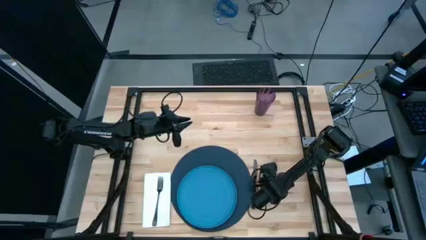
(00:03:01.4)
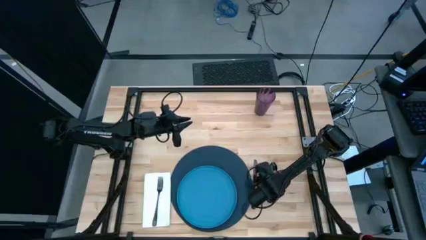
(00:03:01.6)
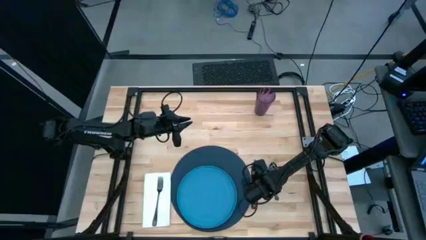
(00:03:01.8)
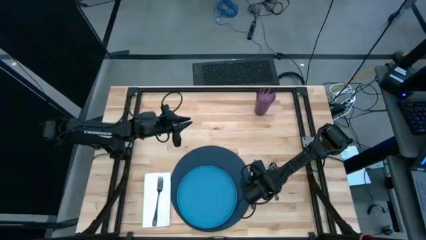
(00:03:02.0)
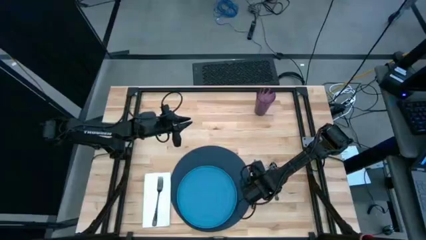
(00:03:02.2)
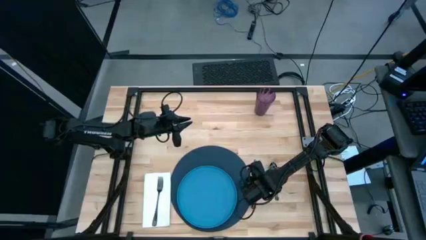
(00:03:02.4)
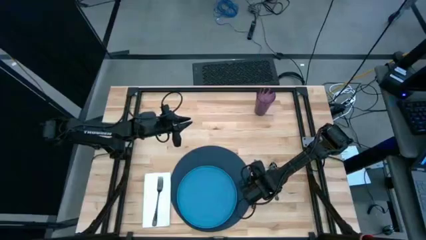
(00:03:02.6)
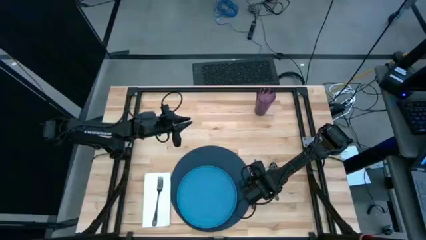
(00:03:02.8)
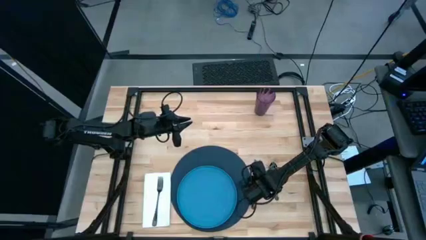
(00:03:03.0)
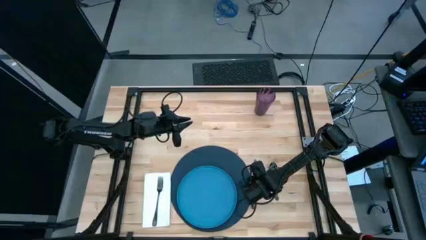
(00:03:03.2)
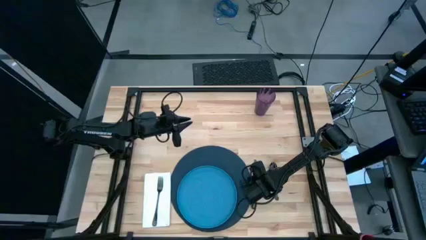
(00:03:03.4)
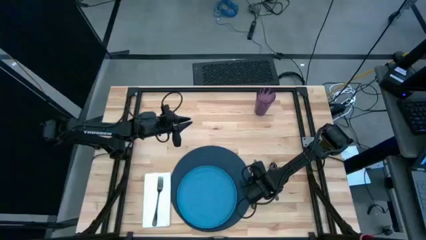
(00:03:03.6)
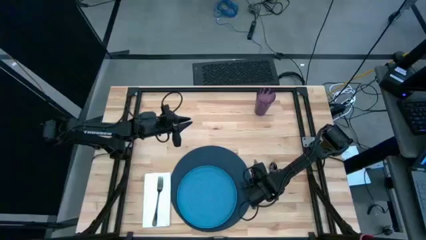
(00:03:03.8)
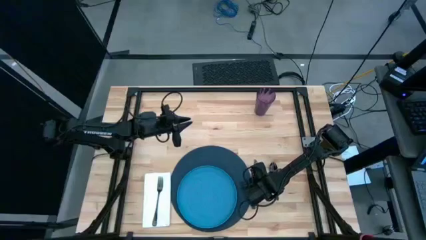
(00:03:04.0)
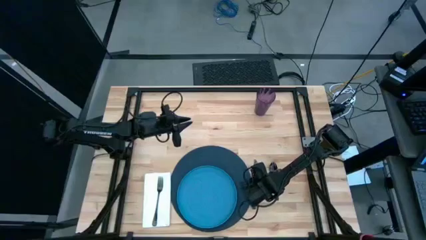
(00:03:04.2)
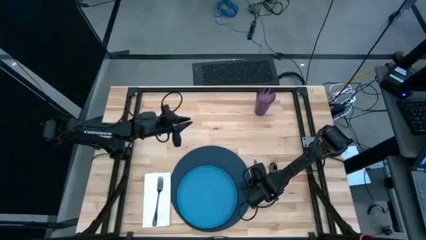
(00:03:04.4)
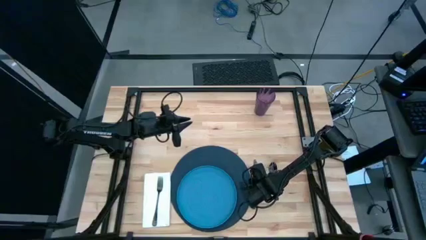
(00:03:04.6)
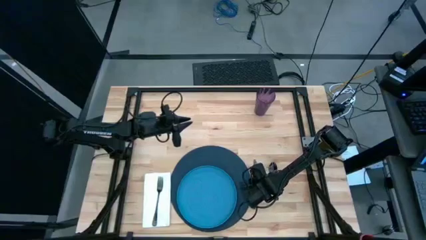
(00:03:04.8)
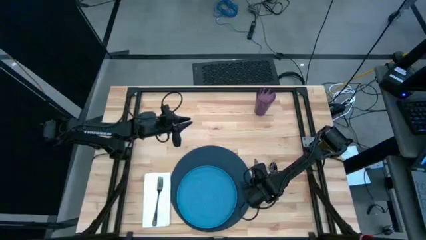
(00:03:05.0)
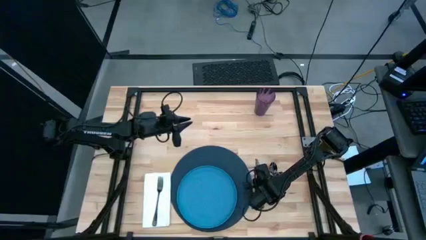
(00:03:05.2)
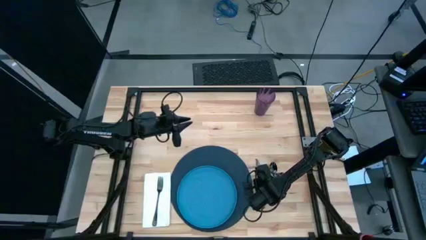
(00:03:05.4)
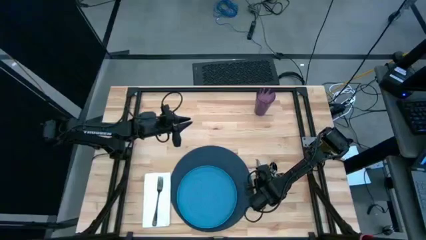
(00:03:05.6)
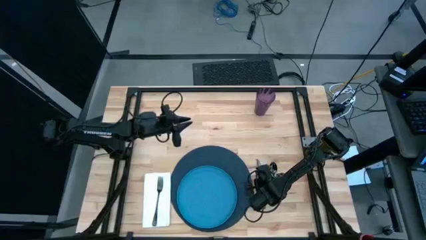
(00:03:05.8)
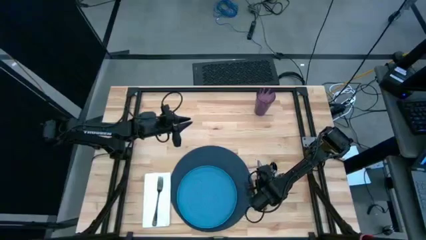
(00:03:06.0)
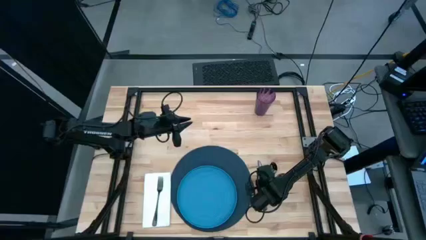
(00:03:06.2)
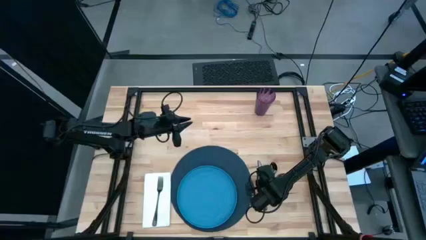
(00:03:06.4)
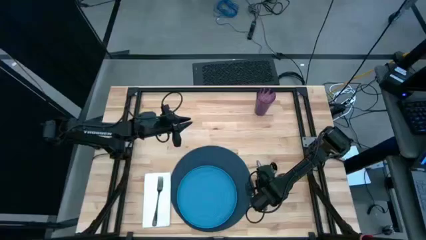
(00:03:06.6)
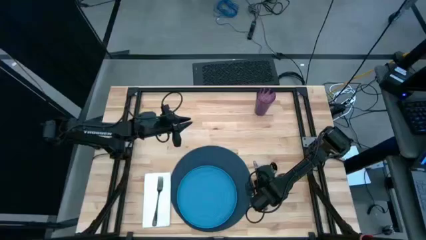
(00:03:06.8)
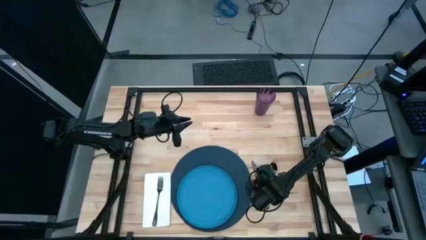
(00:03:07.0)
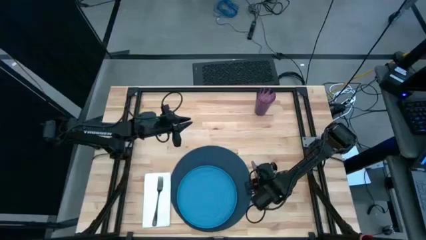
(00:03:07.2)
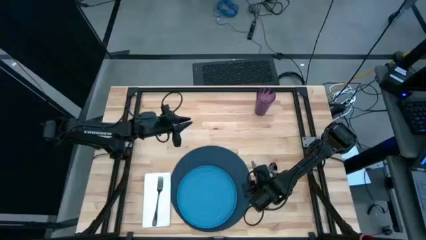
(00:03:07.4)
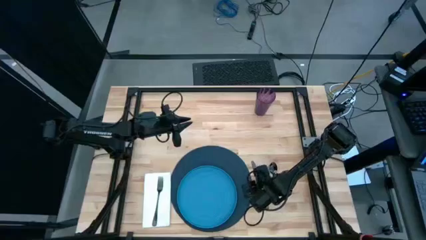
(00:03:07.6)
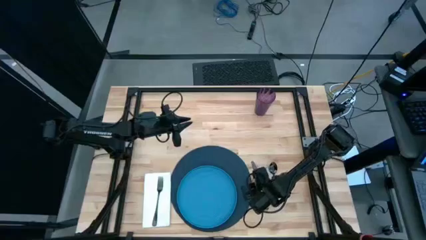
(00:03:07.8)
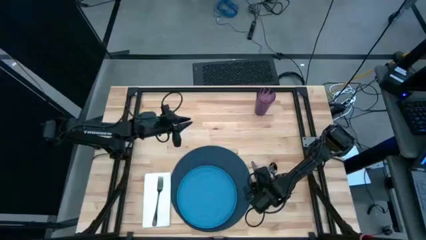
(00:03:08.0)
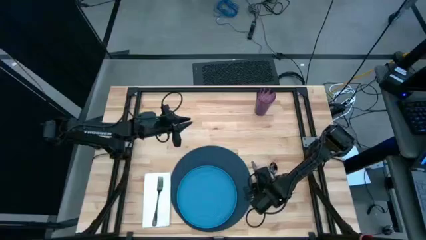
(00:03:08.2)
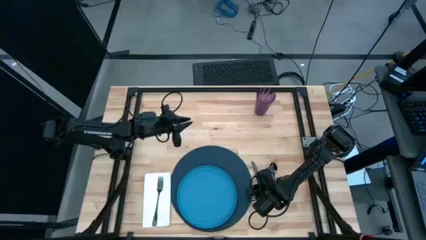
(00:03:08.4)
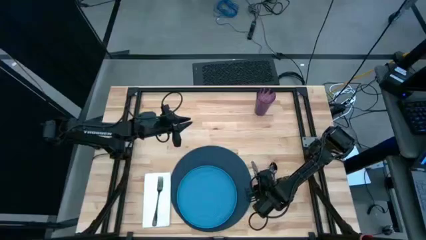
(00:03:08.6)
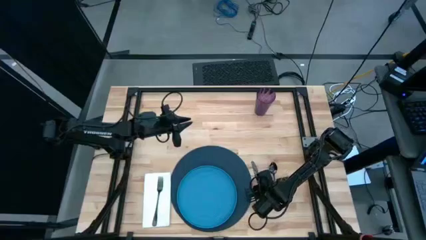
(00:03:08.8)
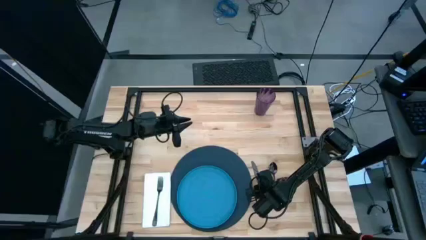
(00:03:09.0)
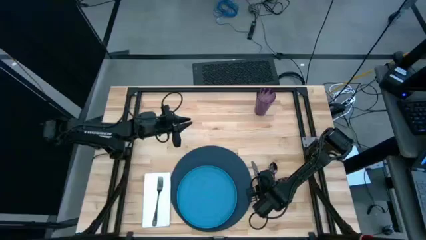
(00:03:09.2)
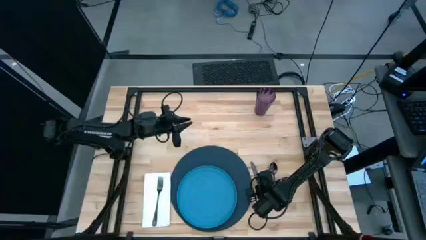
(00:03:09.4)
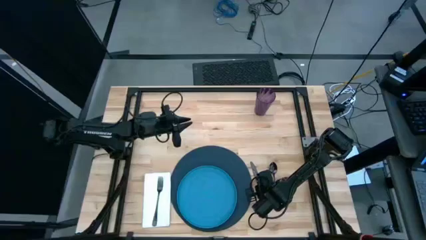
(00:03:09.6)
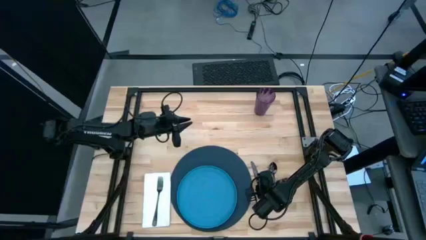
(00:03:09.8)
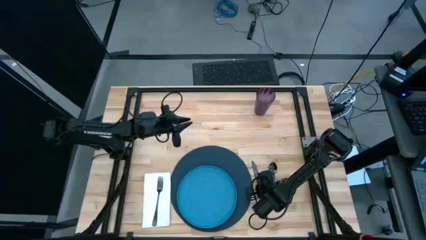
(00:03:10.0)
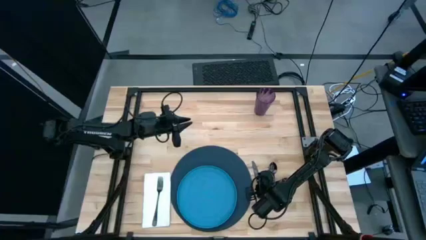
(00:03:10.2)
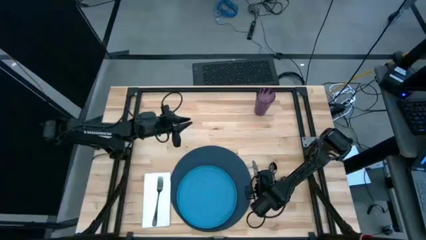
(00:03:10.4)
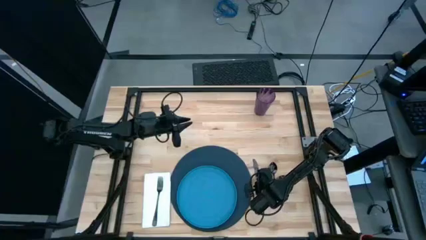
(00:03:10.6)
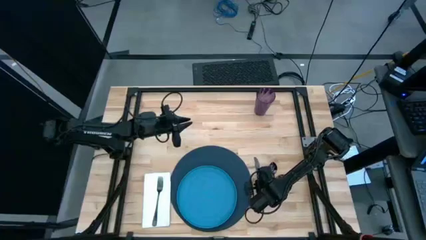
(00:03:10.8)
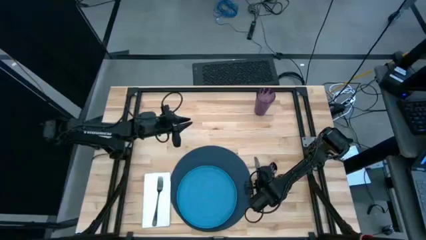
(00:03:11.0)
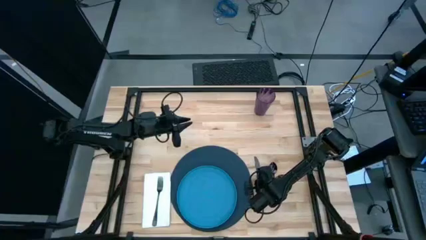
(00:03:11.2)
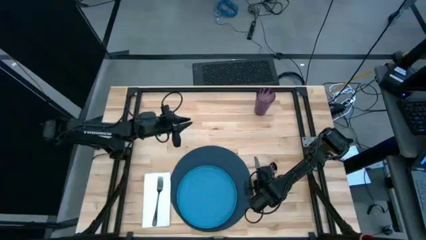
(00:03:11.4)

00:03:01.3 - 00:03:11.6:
Task: Set table place
Adjust the knife

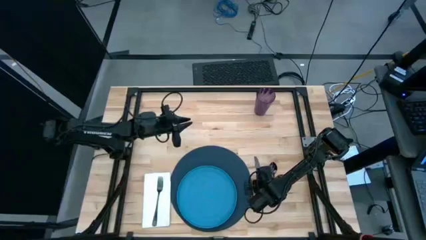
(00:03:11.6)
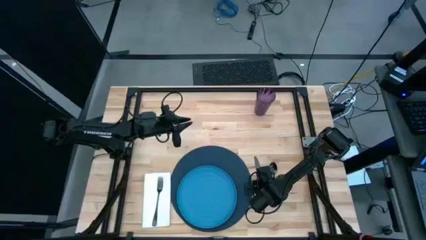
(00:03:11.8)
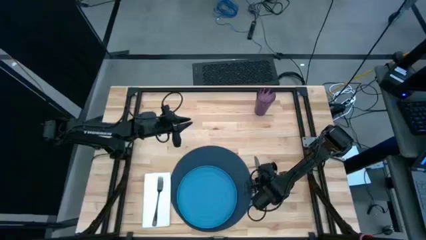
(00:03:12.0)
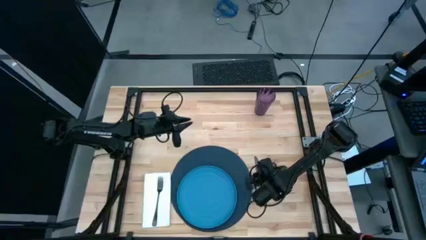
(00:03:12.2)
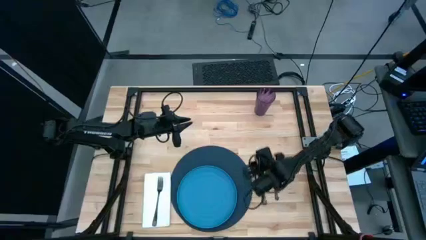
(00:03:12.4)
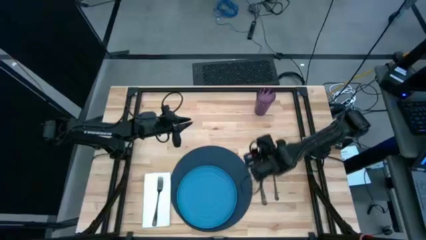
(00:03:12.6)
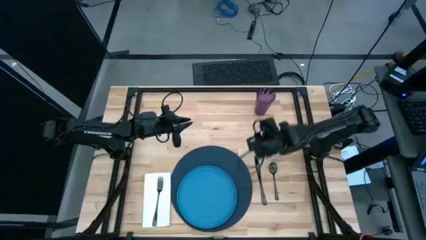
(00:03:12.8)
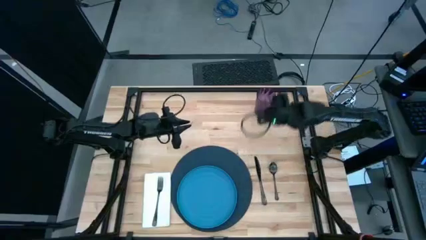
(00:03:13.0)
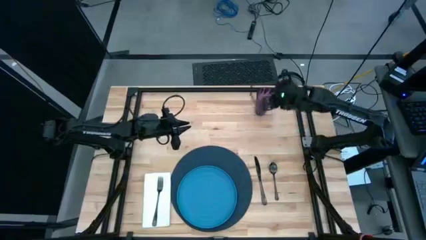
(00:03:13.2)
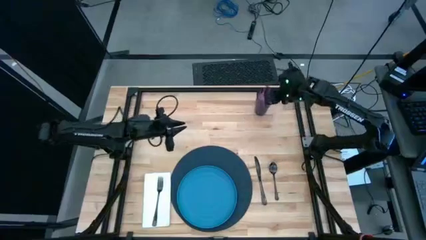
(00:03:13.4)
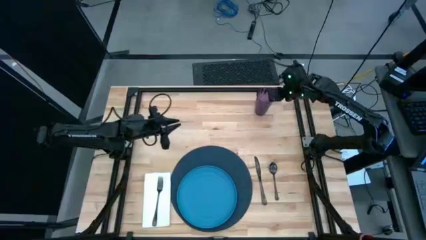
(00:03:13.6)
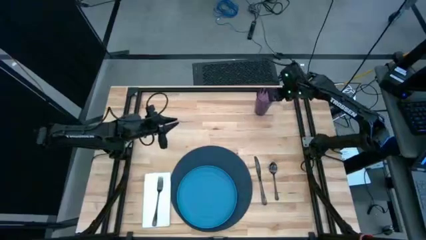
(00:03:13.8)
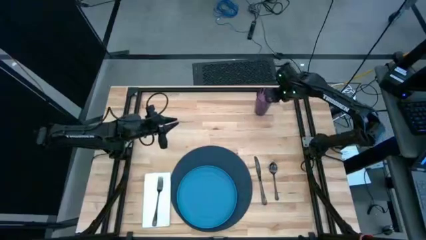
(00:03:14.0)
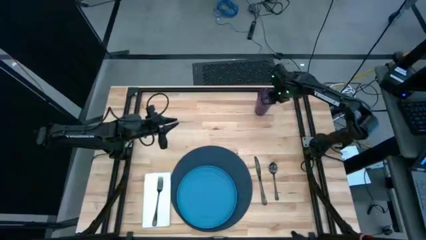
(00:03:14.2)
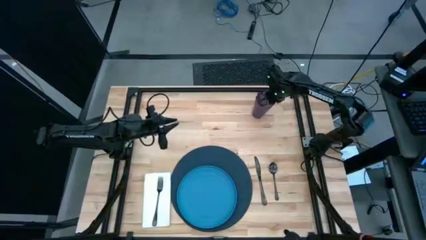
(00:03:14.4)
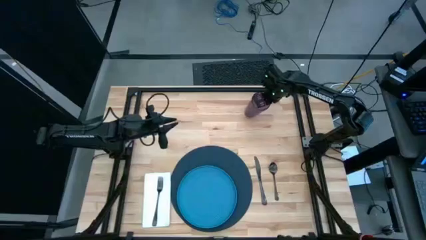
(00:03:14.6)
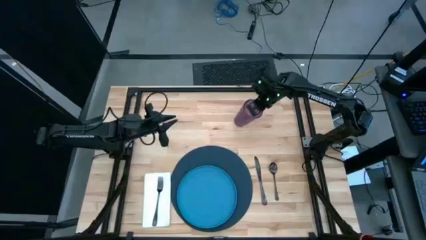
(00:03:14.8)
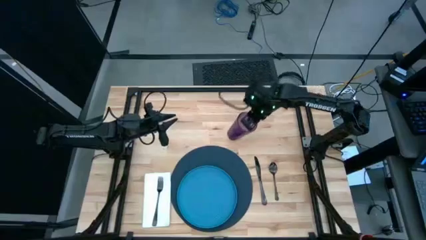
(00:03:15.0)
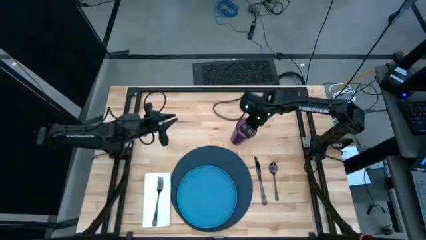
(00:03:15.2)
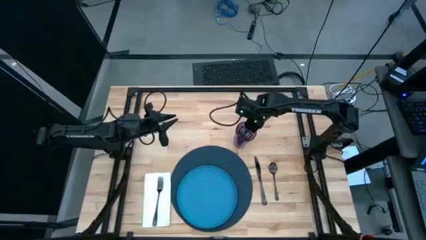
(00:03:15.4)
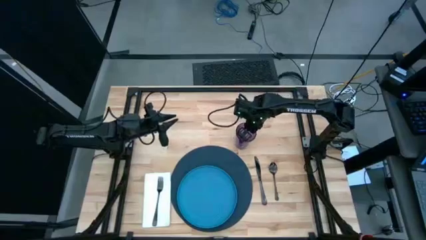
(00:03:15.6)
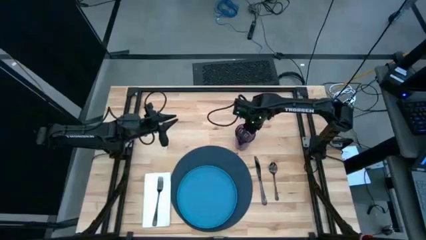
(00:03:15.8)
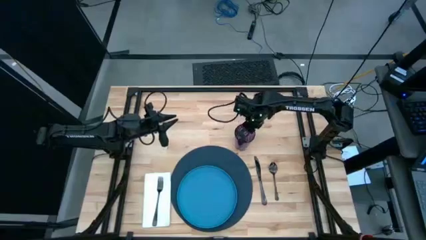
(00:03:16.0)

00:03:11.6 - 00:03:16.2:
Put the purple cup to the top right of the dark blue placemat
